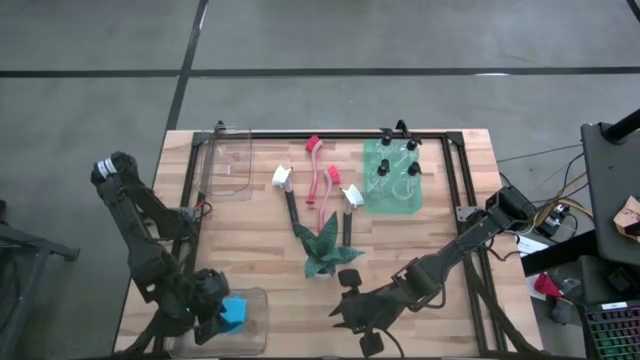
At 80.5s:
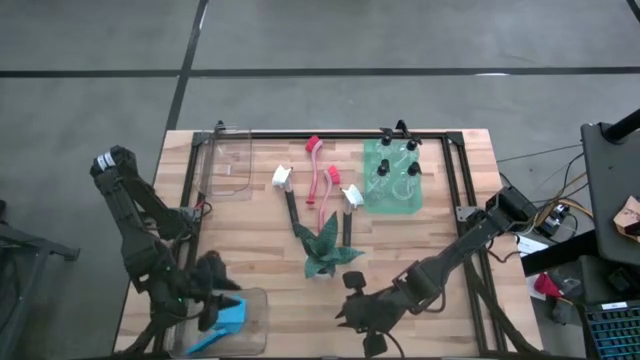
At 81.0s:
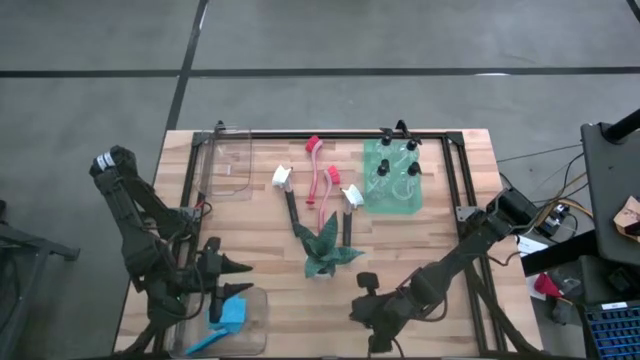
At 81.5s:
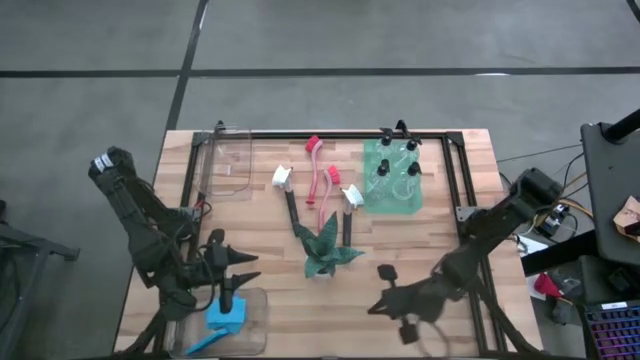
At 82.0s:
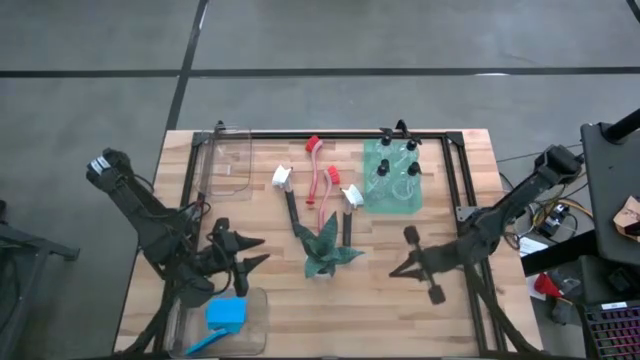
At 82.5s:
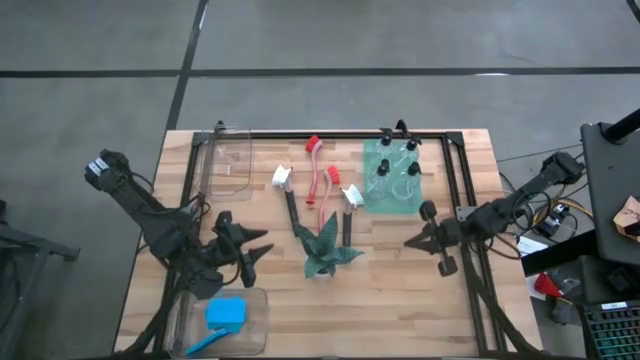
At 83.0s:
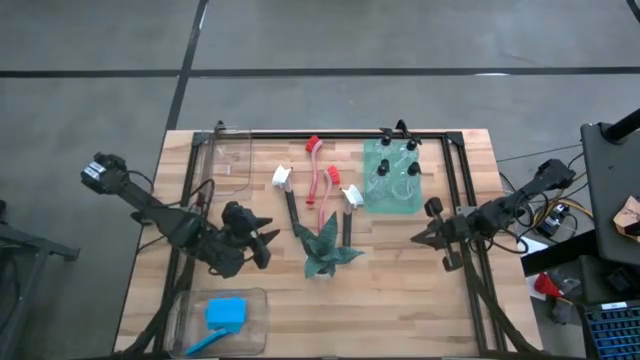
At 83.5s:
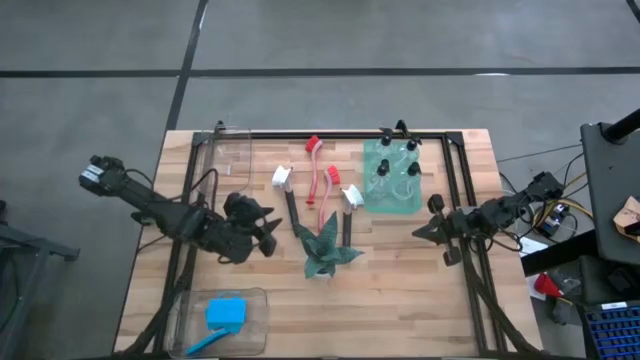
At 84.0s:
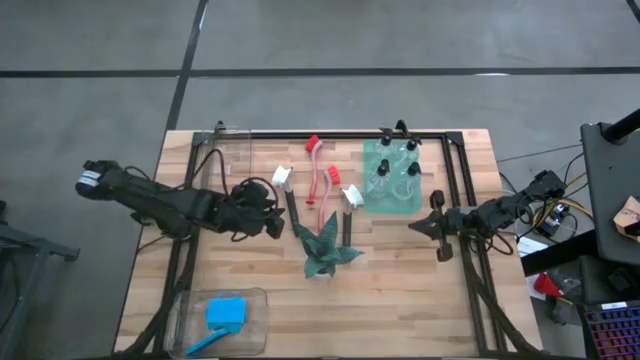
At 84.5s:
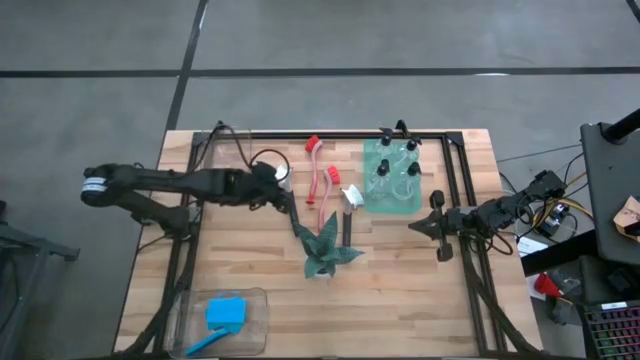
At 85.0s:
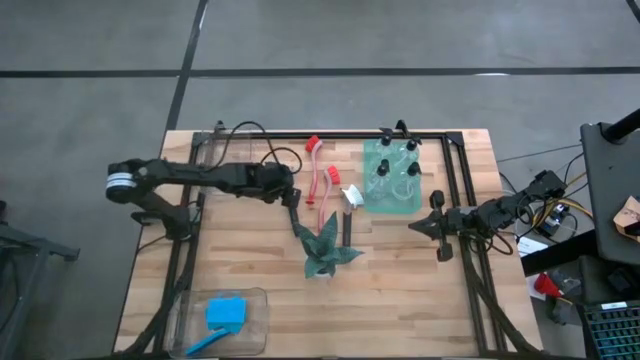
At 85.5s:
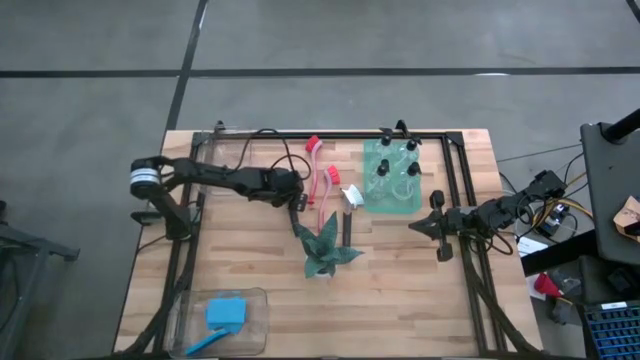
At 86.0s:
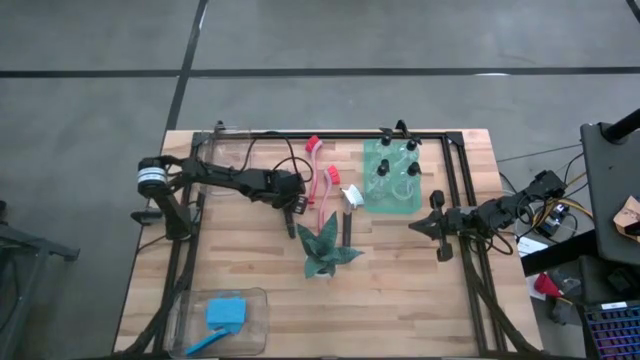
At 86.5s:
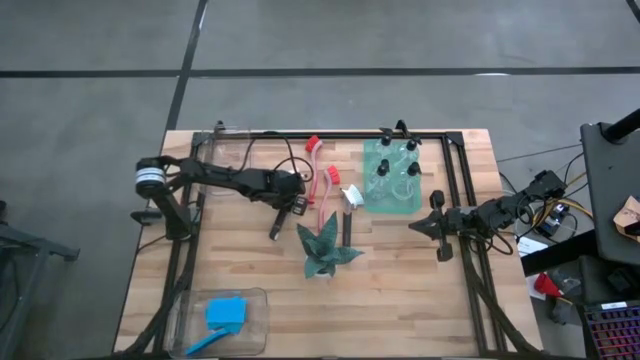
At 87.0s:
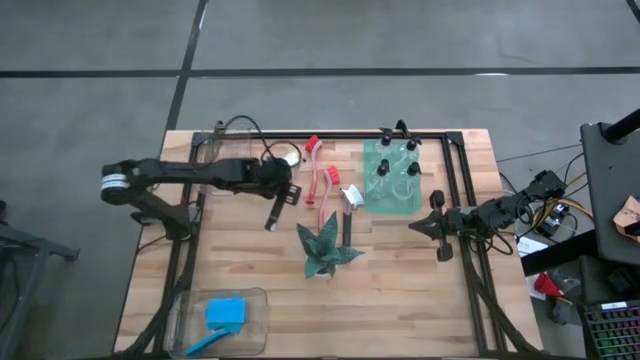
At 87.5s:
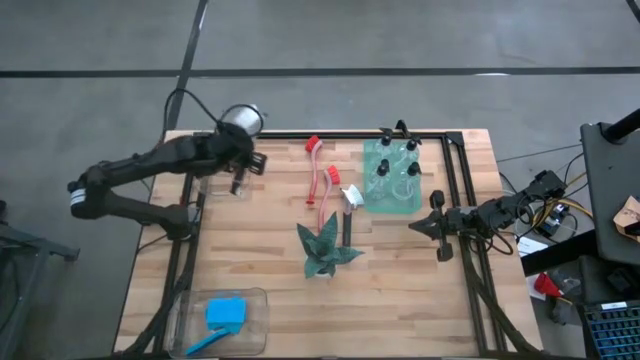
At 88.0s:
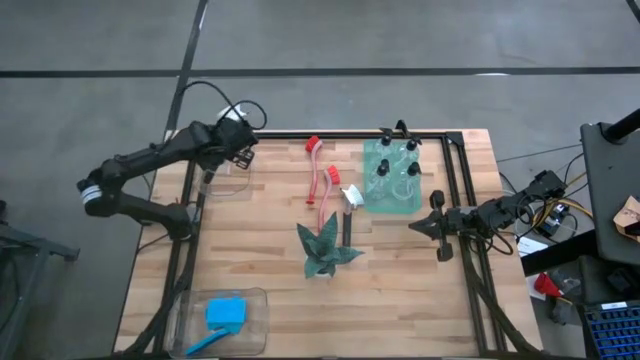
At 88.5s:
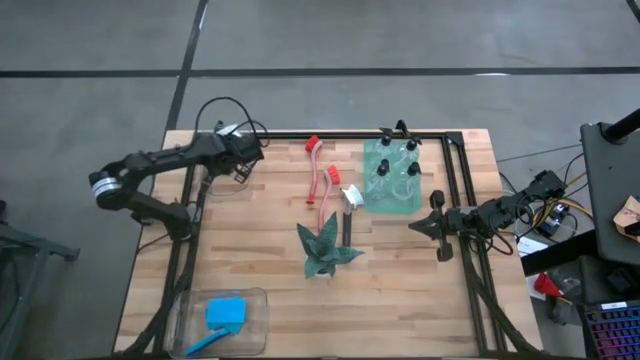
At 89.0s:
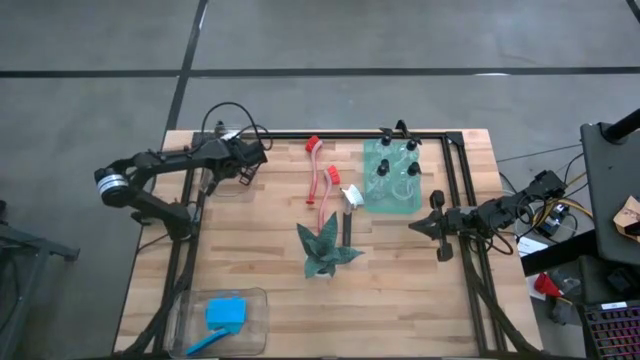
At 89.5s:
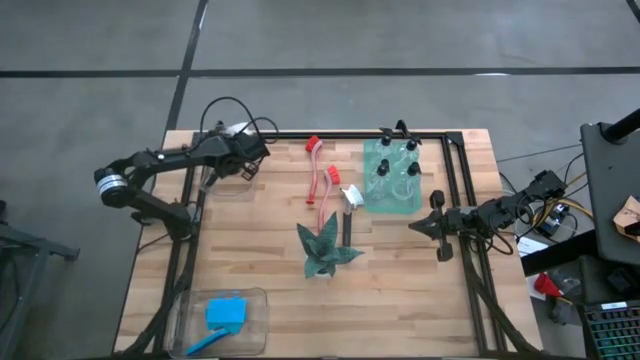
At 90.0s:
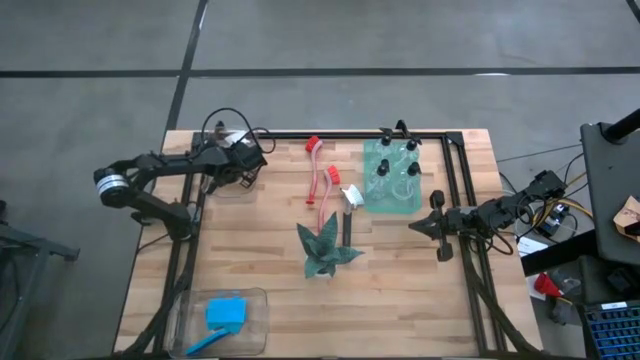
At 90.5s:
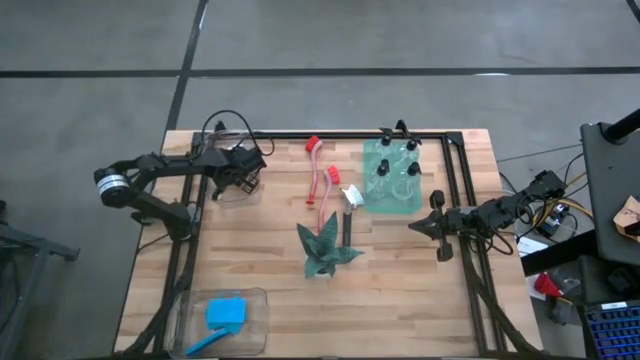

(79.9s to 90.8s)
Task: Pick & Place Kitchen Sink Supplies
Put the black dish brush into the top transparent bin

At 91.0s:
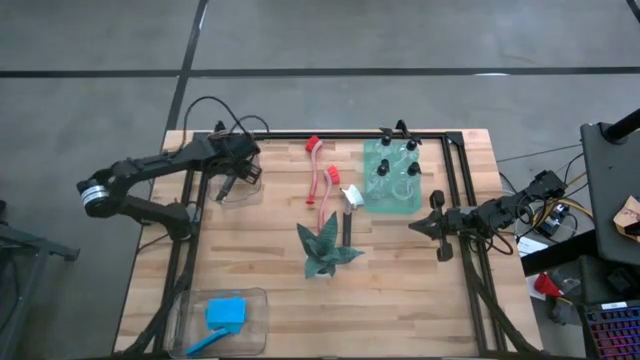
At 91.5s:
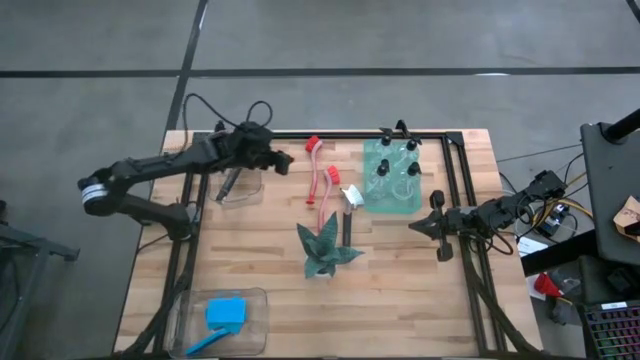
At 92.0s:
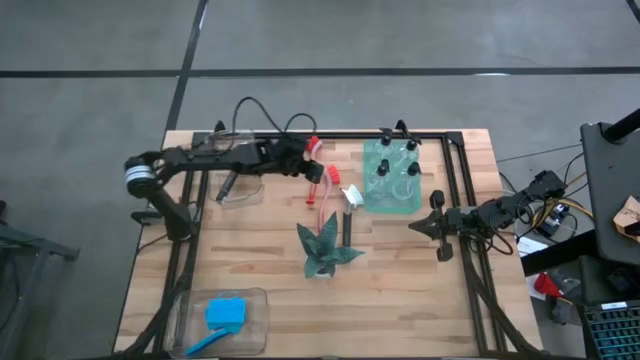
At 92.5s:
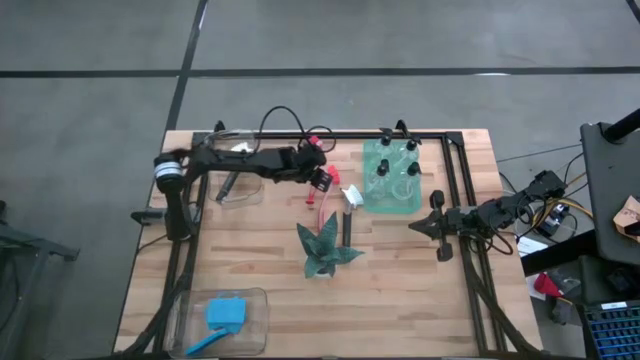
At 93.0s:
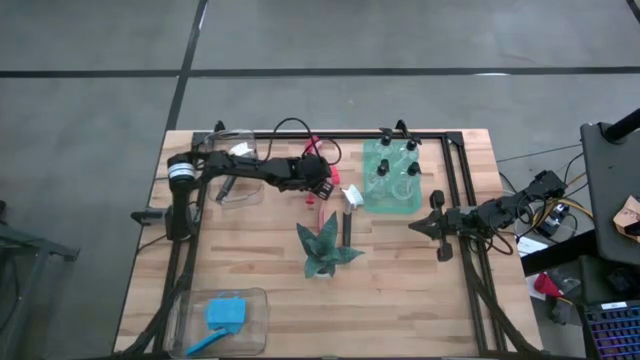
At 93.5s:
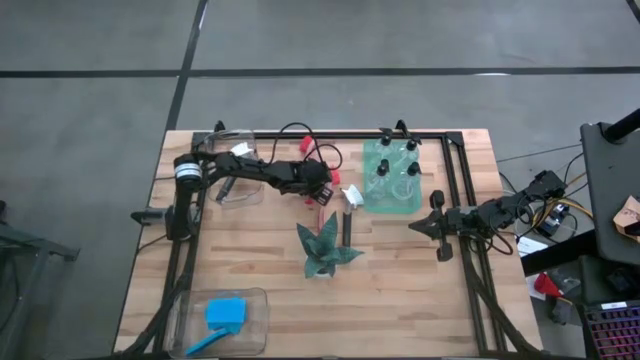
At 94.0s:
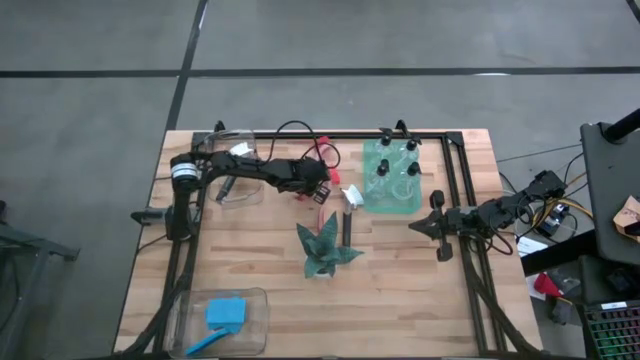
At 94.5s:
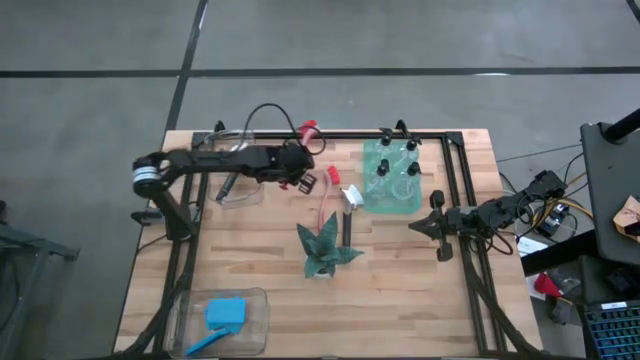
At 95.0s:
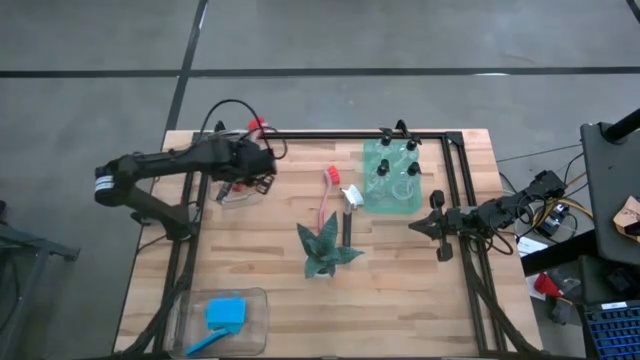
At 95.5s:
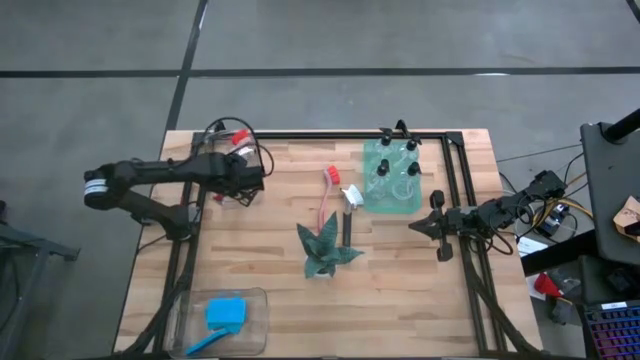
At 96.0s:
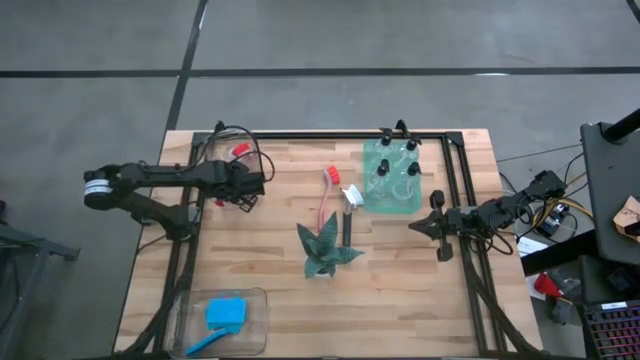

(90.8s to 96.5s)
Put the red dish brush into the top transparent bin

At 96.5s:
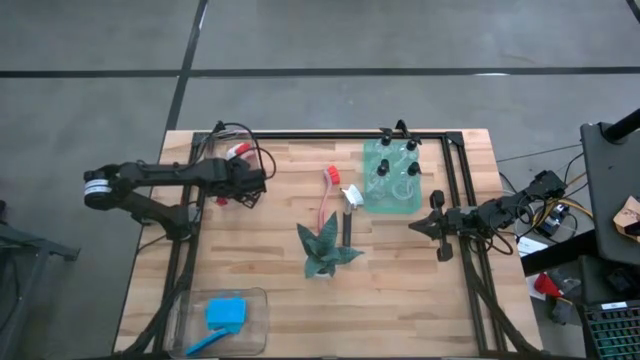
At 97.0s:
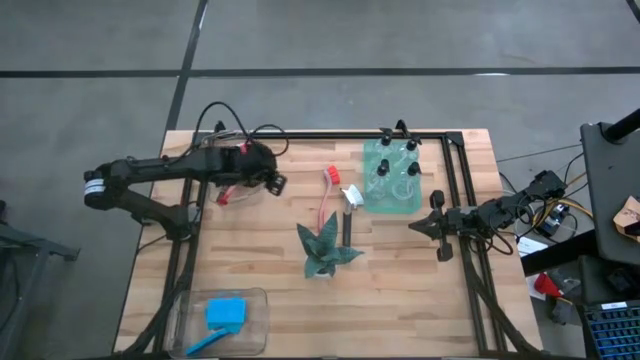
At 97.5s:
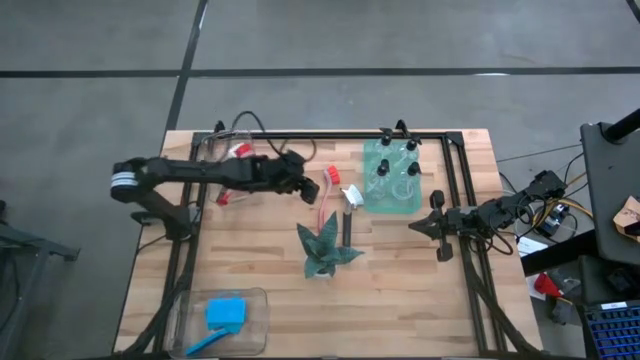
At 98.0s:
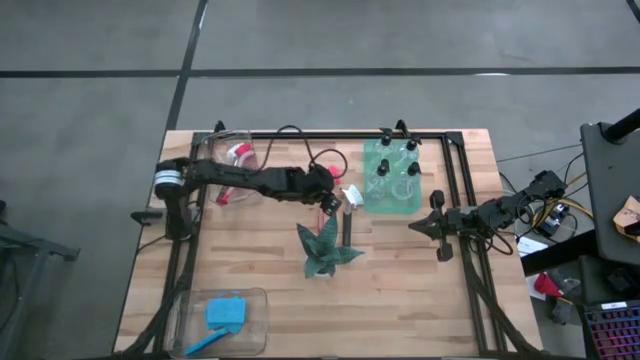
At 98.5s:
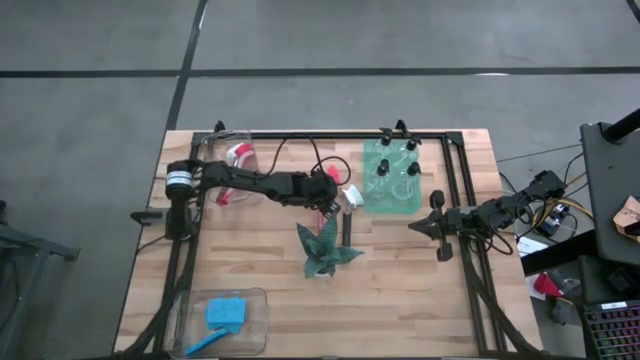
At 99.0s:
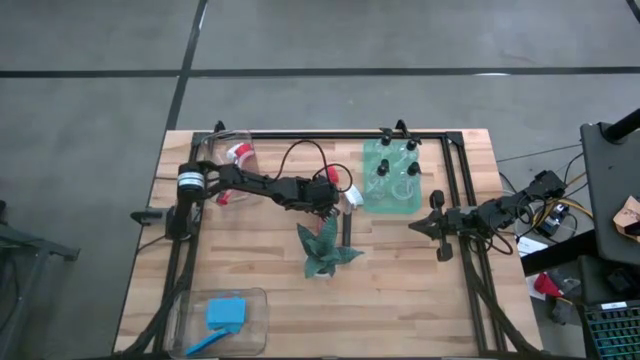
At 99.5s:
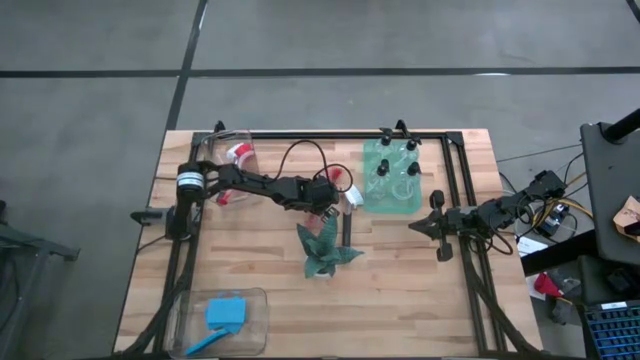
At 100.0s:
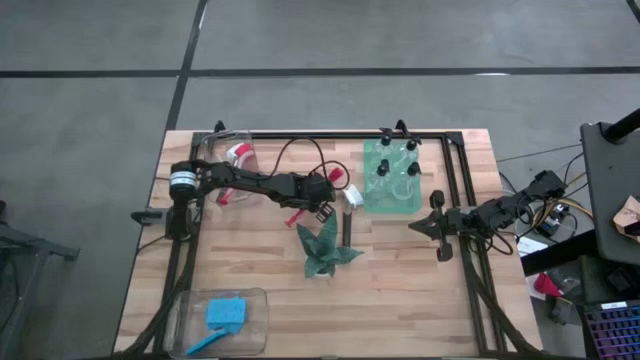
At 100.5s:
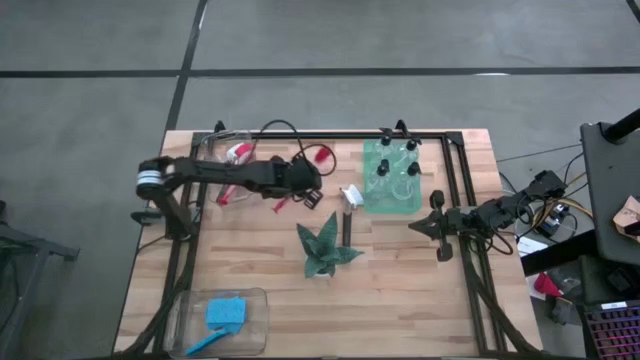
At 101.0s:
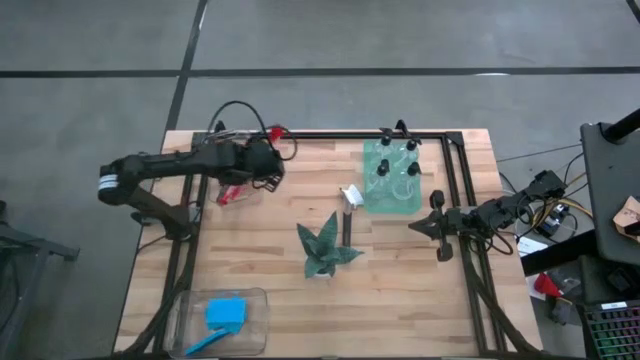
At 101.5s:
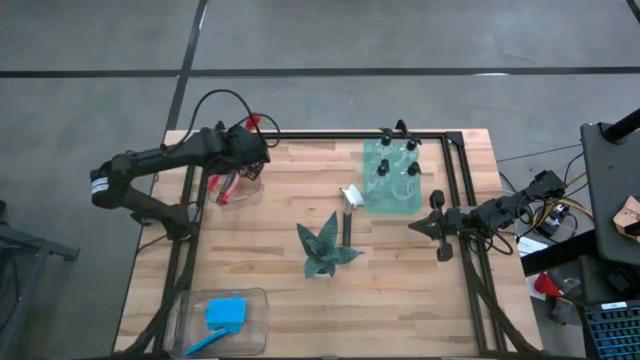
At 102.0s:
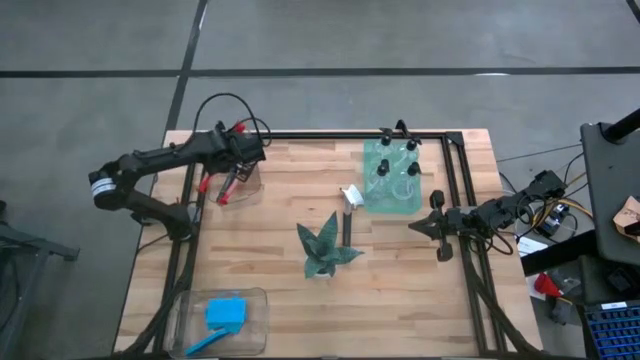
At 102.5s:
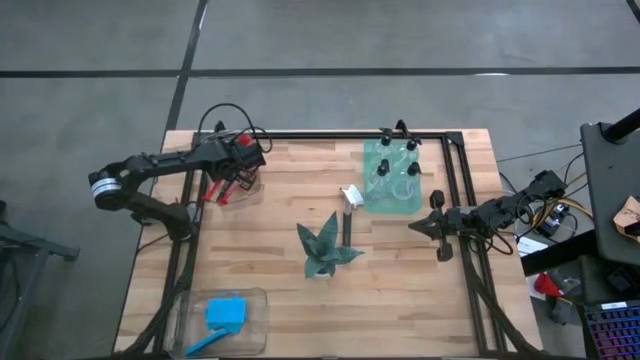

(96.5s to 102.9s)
Put the red dish brush into the top transparent bin
